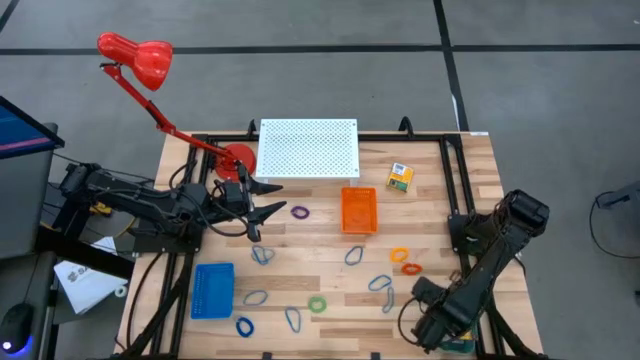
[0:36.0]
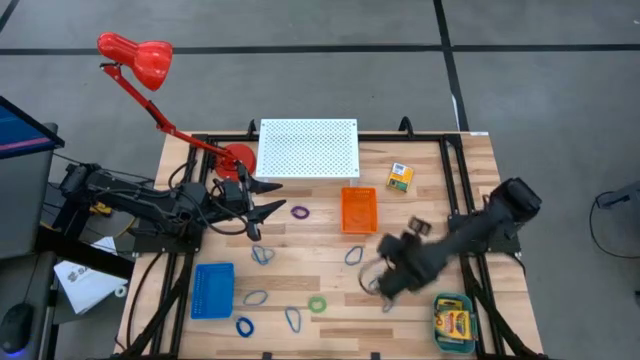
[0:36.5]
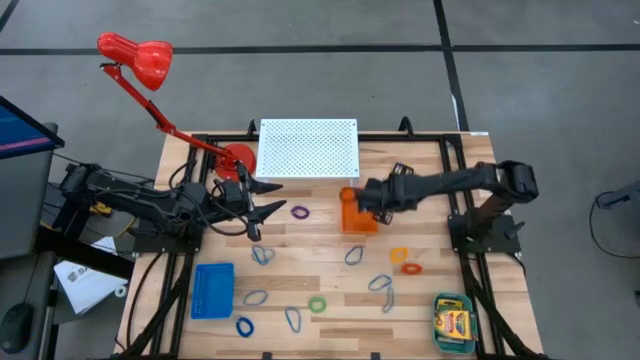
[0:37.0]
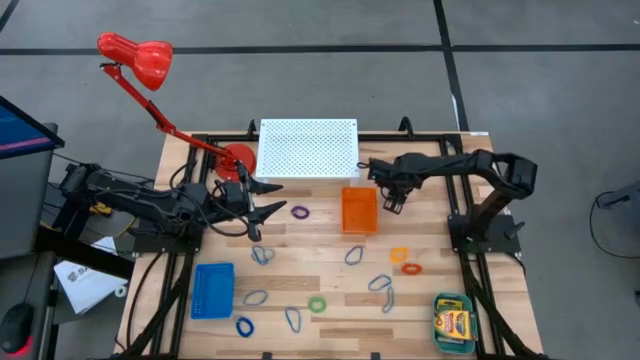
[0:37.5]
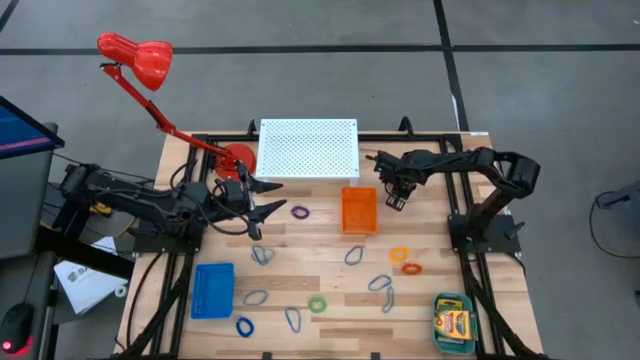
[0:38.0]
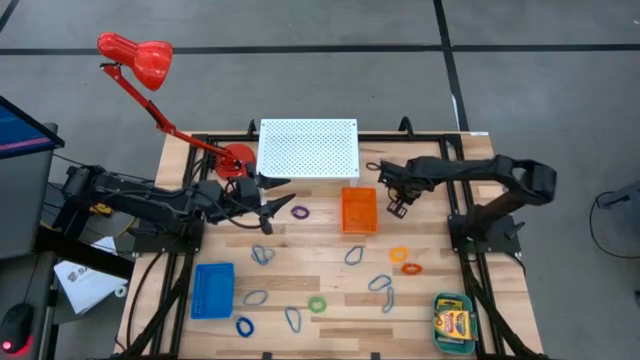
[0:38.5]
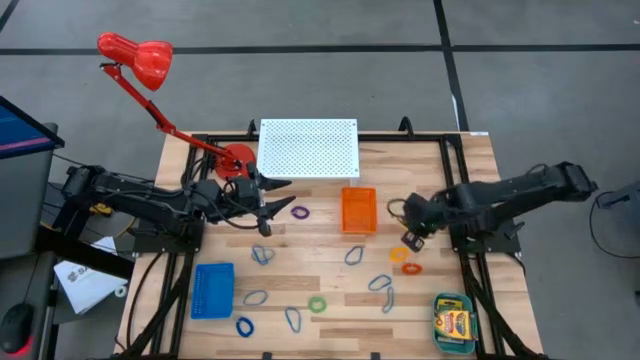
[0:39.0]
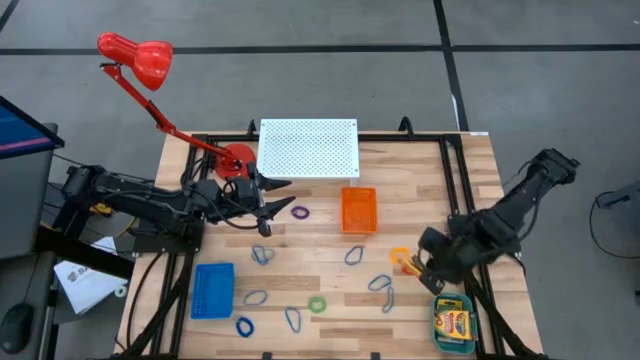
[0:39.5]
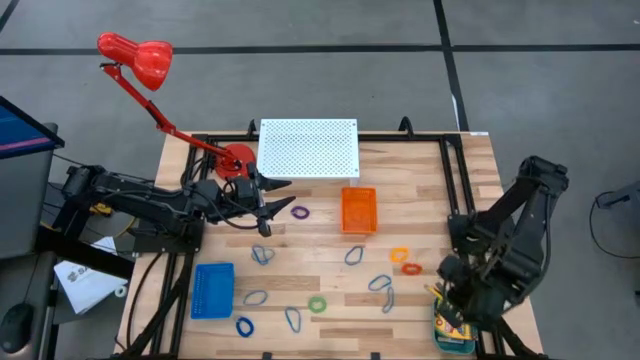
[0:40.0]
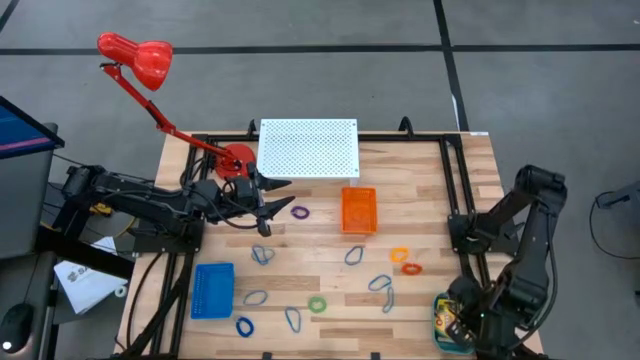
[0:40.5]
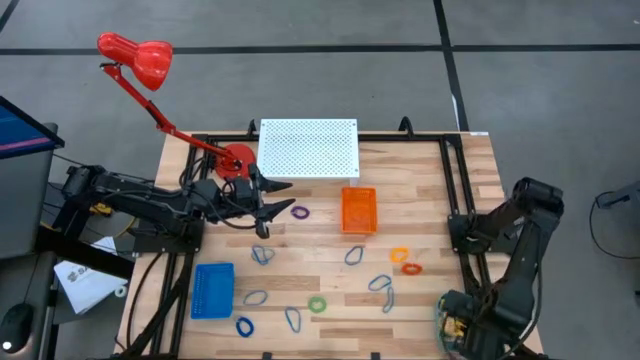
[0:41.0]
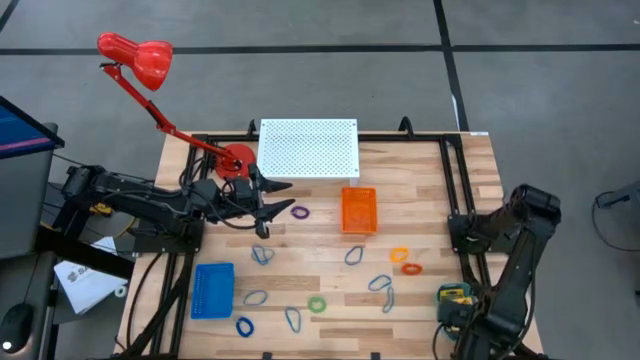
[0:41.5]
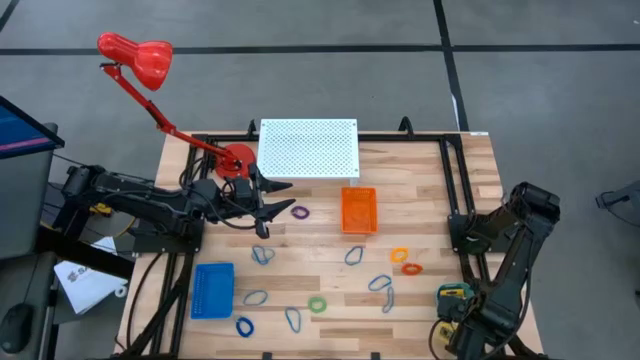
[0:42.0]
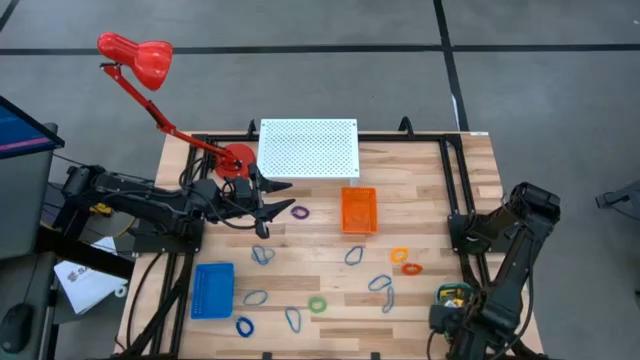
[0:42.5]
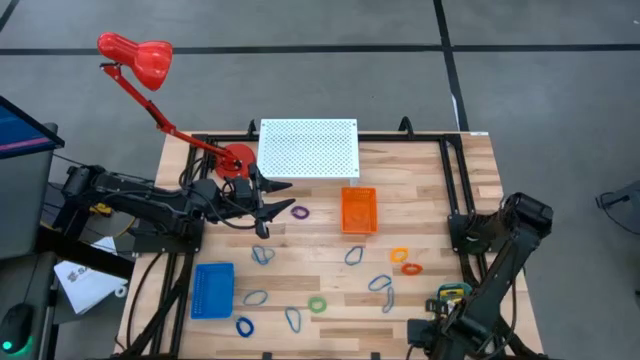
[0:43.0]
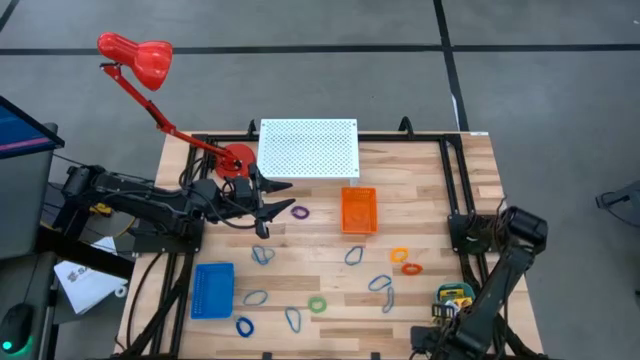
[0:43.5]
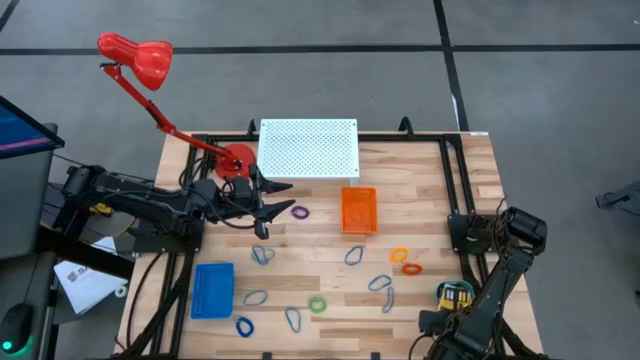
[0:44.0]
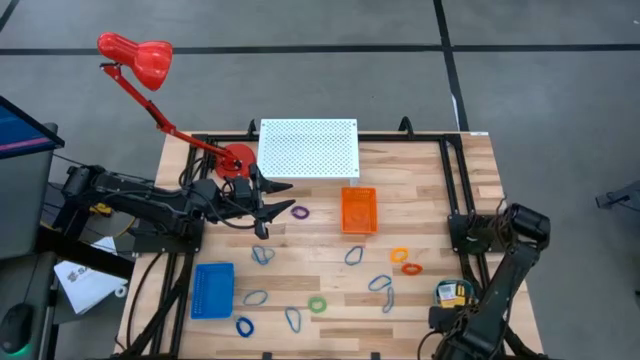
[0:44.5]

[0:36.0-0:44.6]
Task: Pick & Place Office Desk Supplies
Put the yellow crayon box into the bin

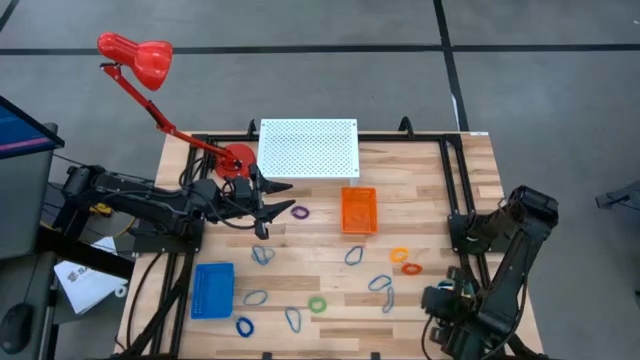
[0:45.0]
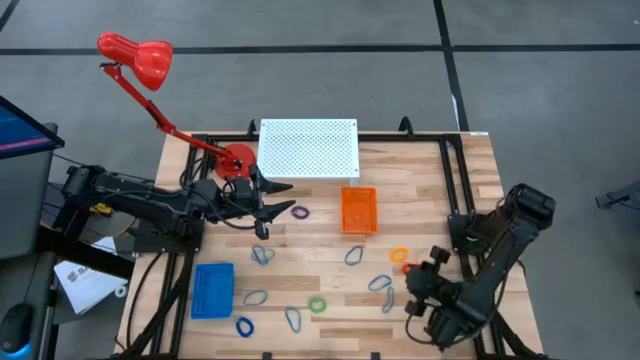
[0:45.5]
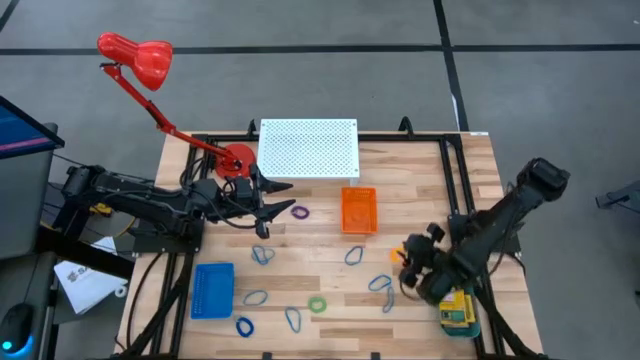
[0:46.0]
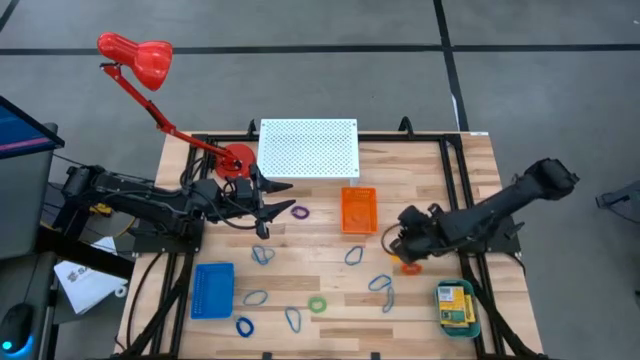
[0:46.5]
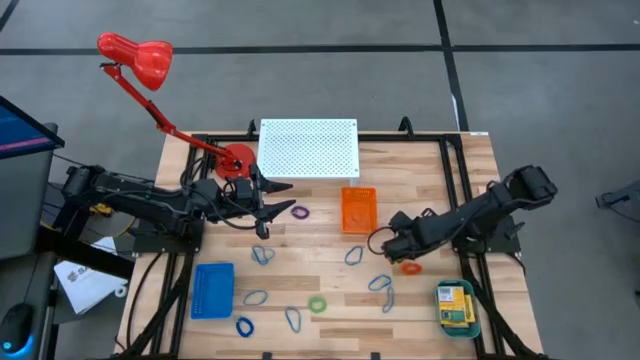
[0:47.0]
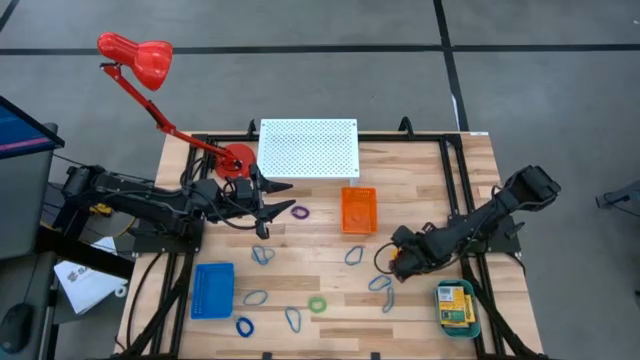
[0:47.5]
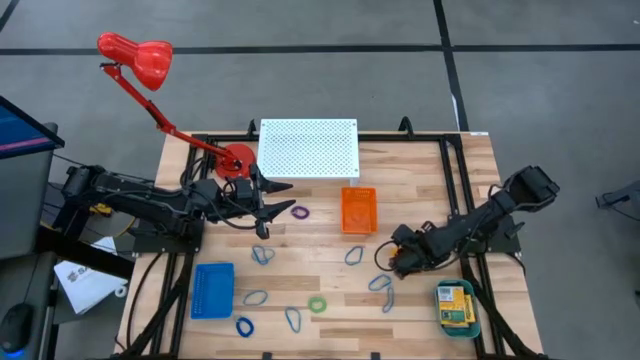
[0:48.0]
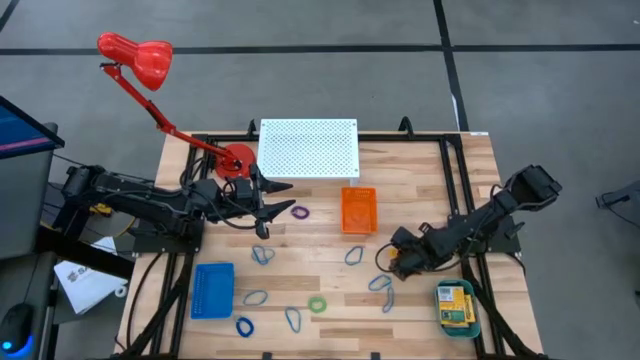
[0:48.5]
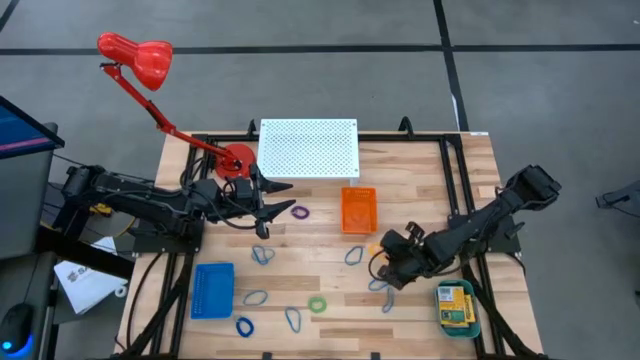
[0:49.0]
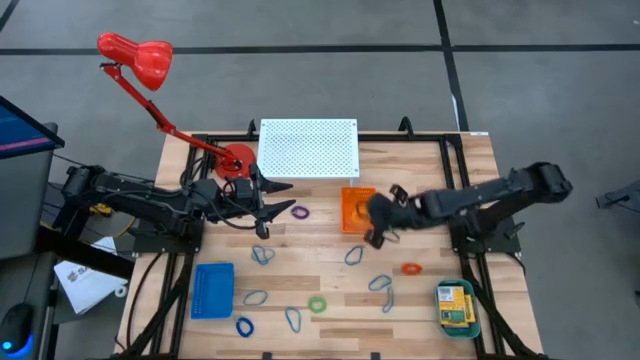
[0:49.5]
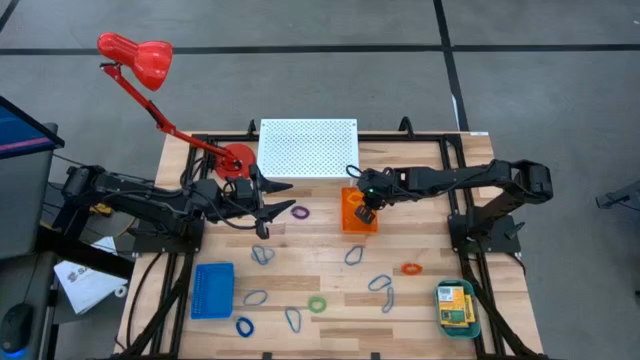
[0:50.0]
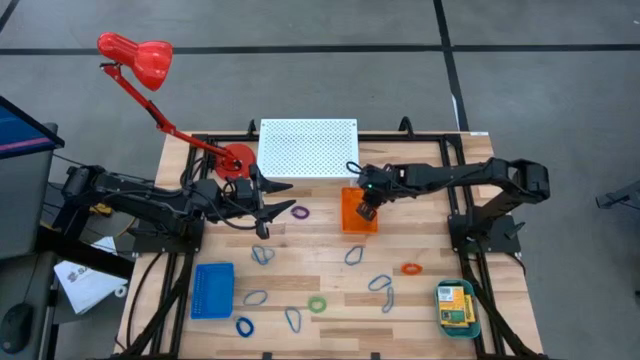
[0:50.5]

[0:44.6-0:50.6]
Put the yellow spring keychain into the orange bin

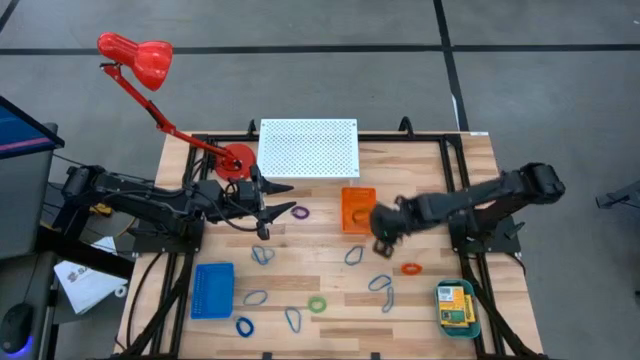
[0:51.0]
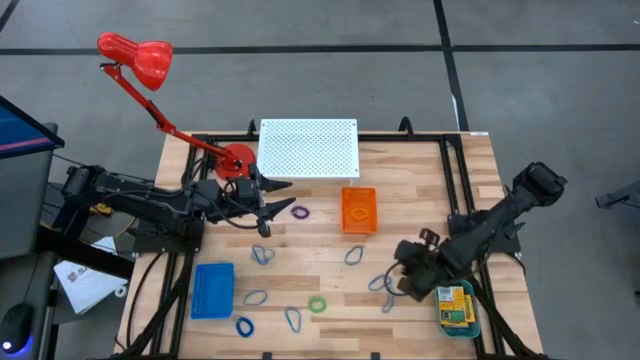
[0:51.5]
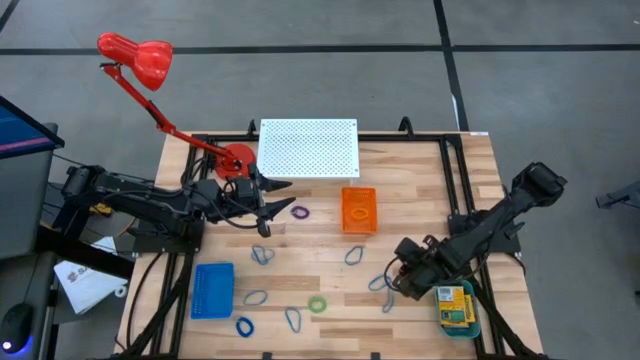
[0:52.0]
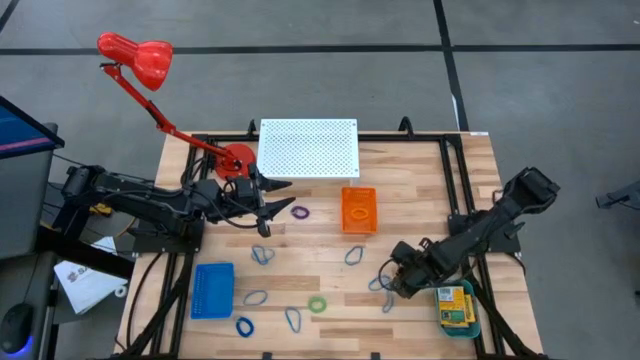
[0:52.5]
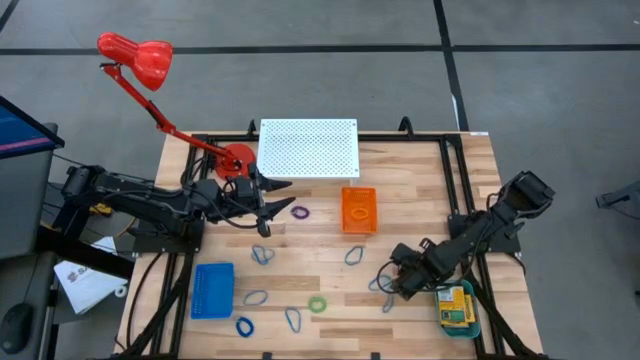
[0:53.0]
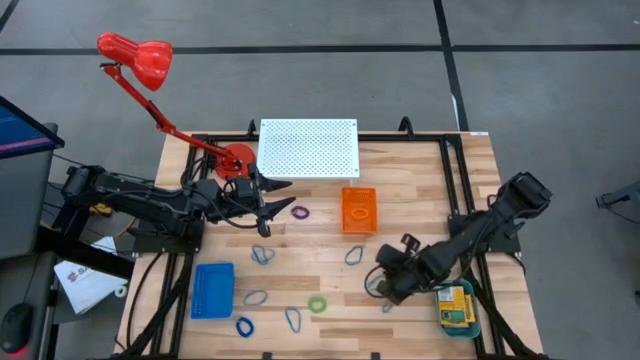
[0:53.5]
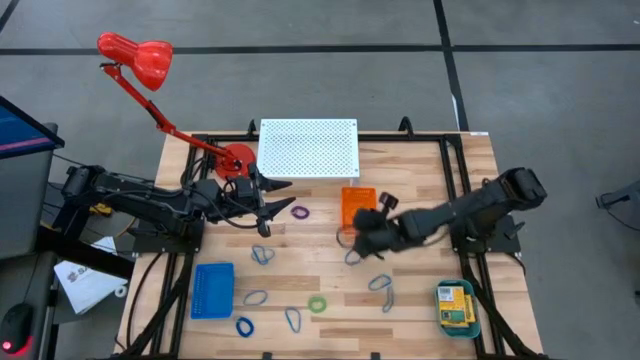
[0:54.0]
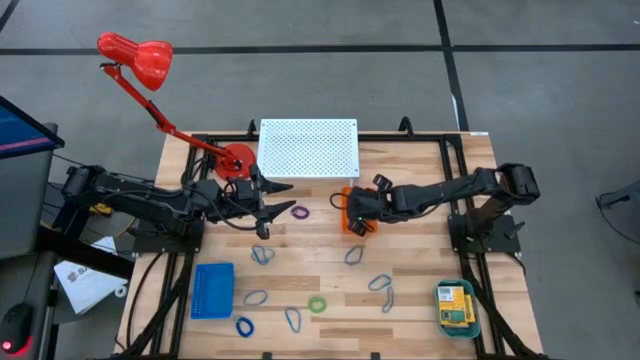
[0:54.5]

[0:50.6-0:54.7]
Put the orange spring keychain into the orange bin

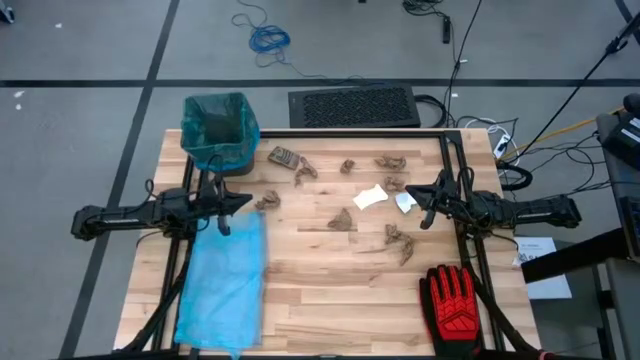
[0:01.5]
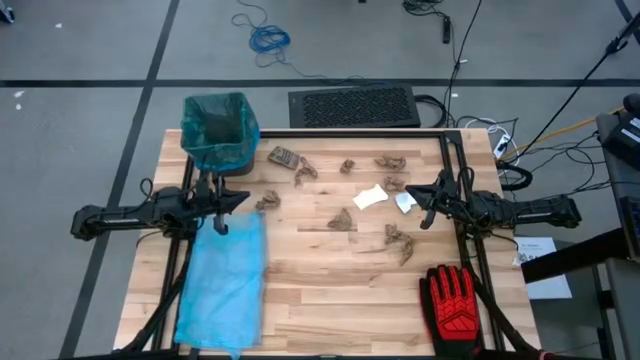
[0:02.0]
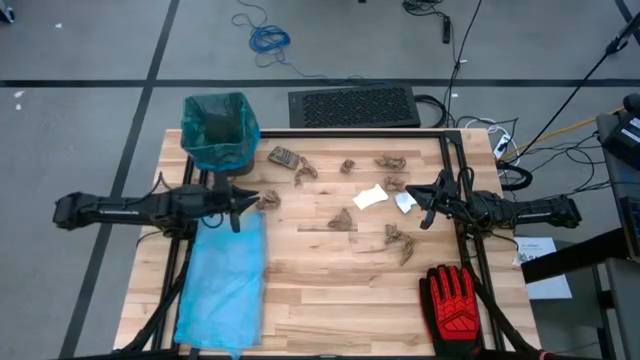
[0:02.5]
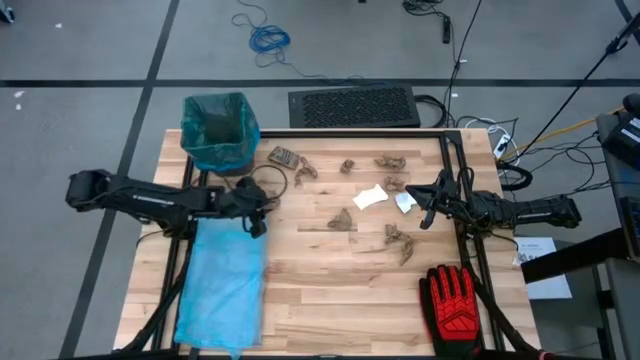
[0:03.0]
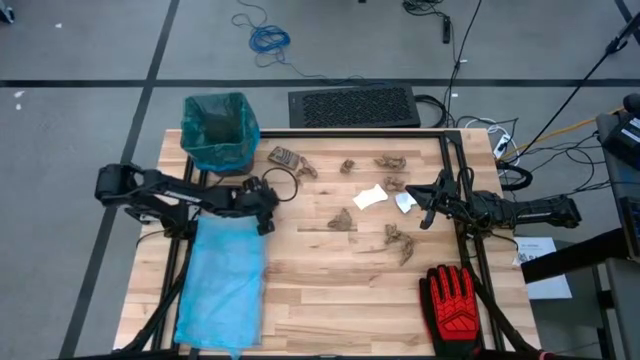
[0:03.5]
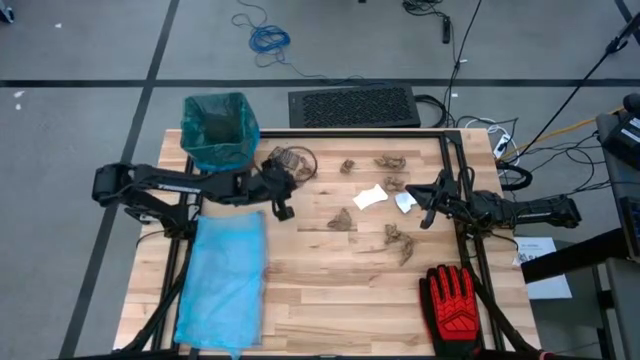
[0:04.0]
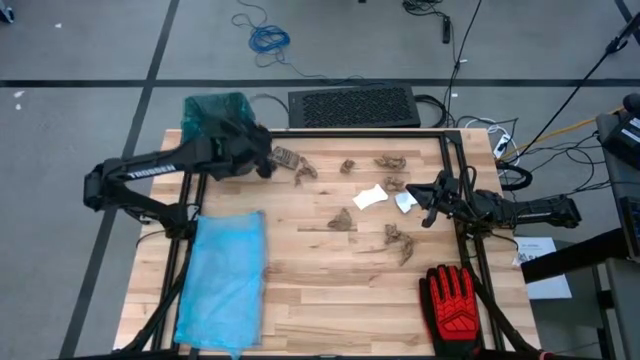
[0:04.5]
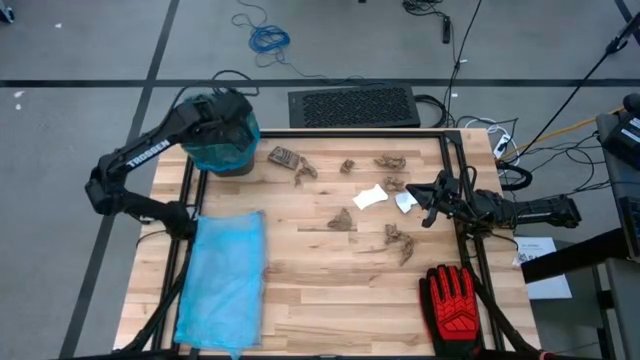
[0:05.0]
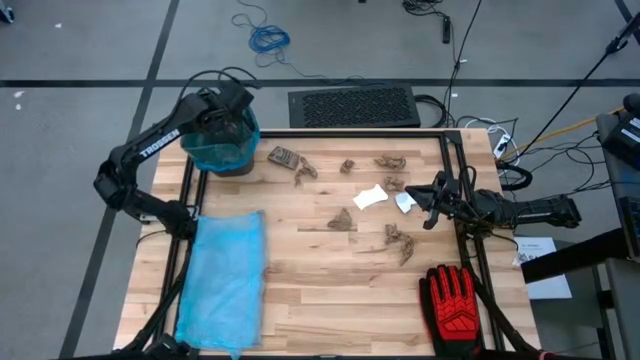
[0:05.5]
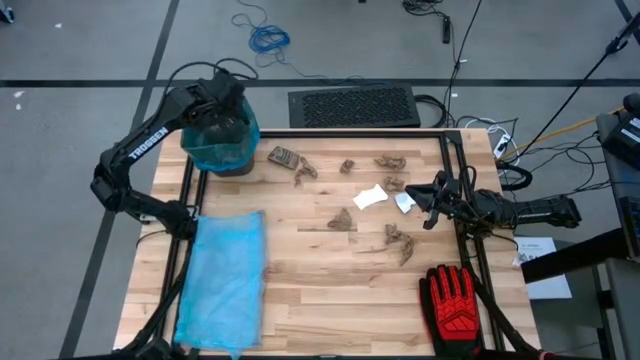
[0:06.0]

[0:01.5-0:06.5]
Task: place trash/remove bag and relplace
Put the brown napkin into the black trash bin
